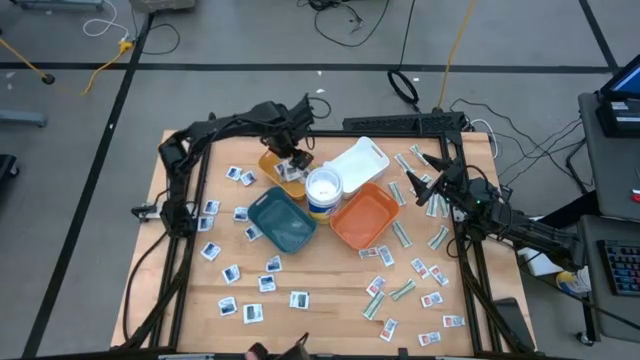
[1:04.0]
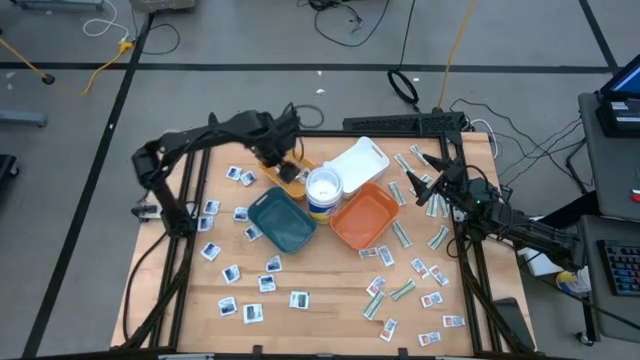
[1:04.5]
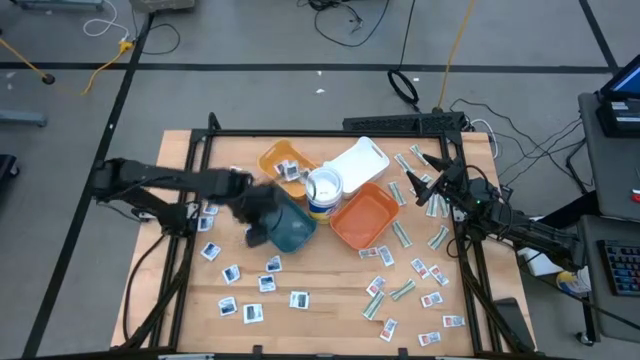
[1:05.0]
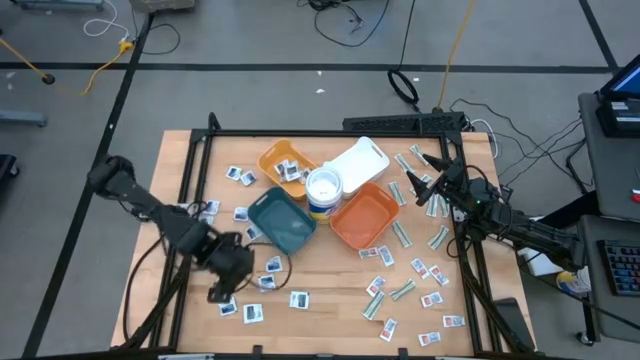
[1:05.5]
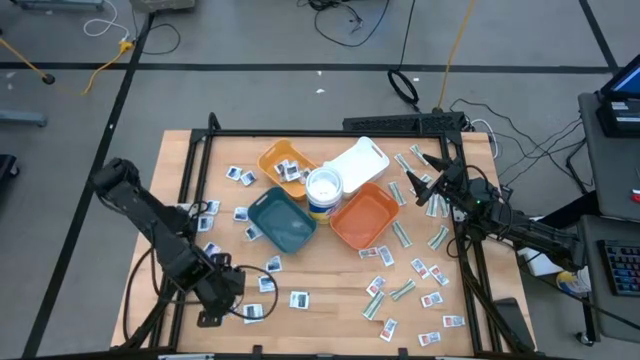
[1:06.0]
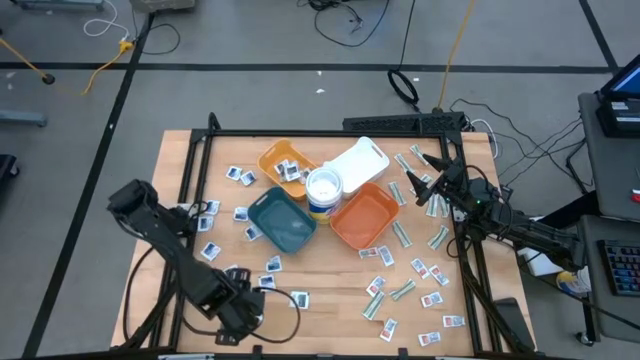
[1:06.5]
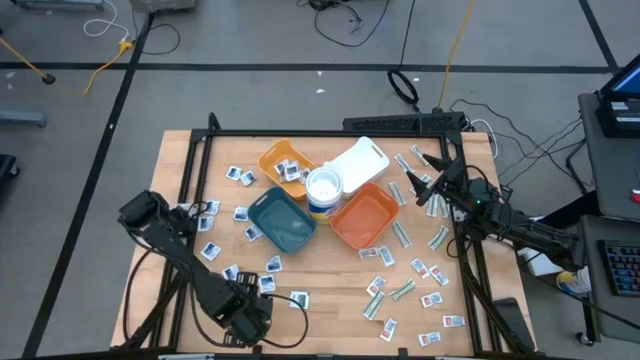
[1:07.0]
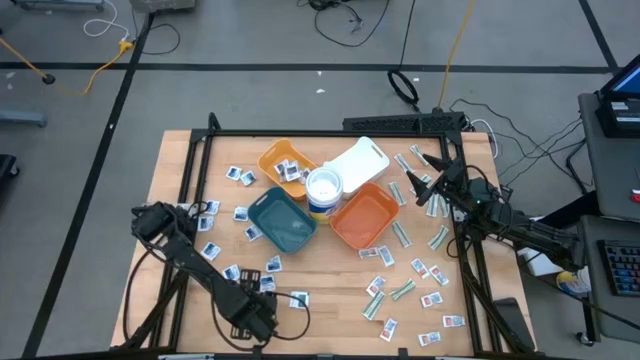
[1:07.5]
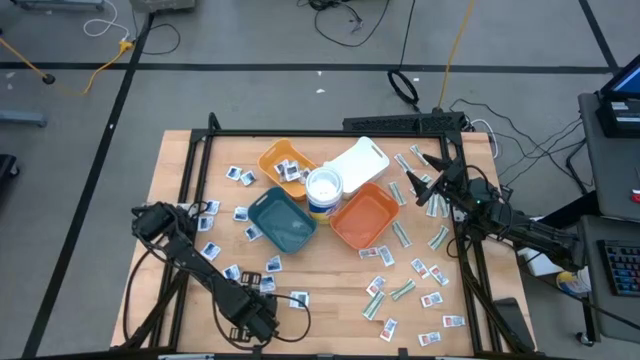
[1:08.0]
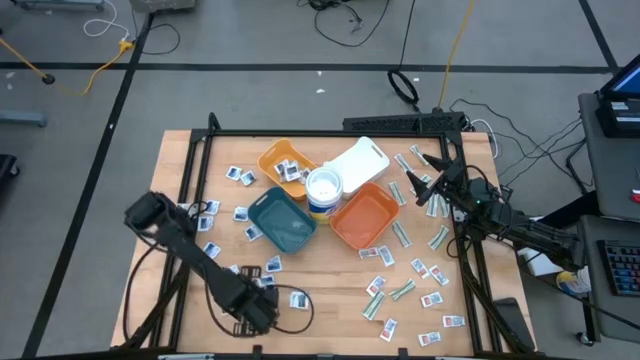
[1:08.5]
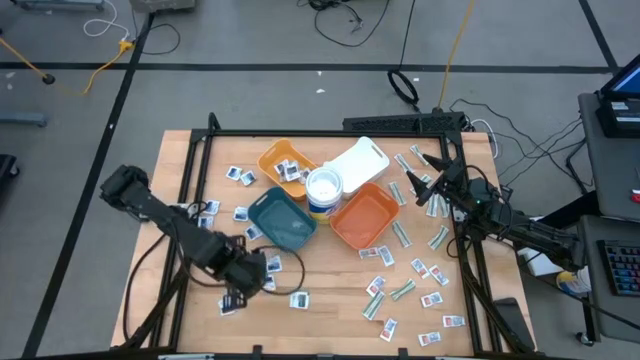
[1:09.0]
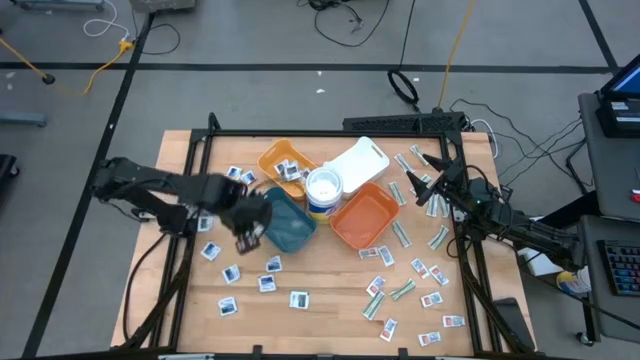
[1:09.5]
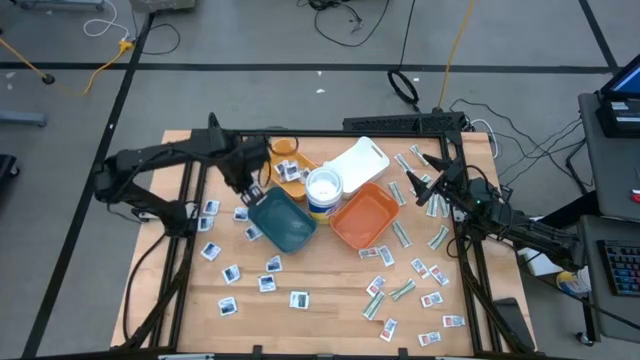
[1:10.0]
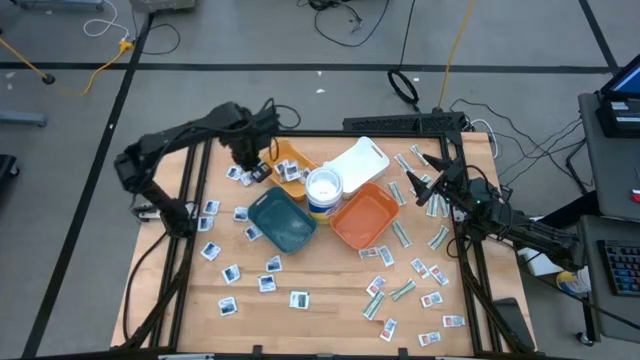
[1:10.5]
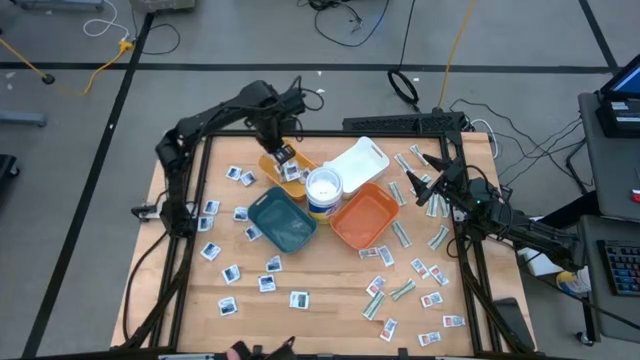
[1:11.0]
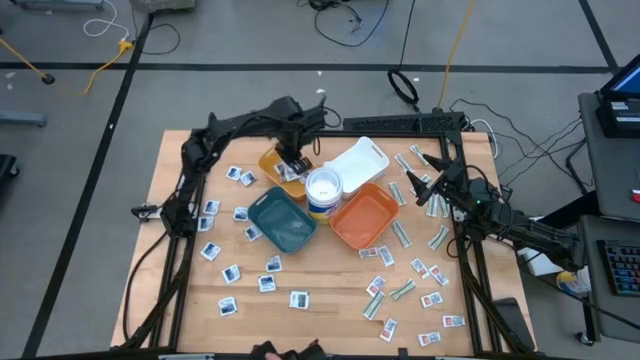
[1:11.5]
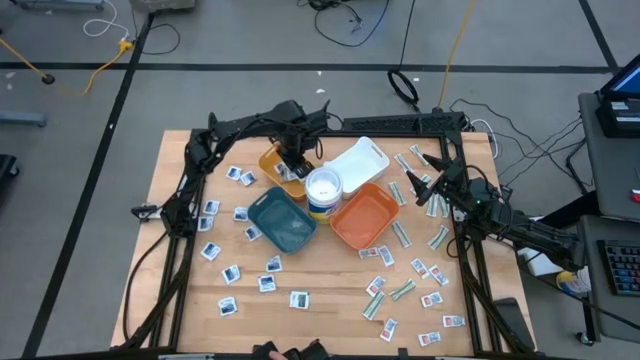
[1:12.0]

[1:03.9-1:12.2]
Task: Pick & Place First Aid Supplies
Put the black pad into the yellow bin

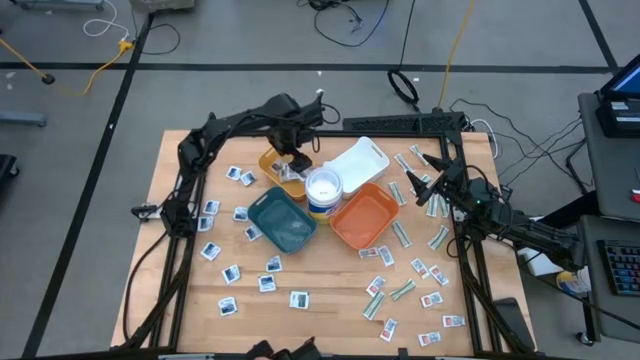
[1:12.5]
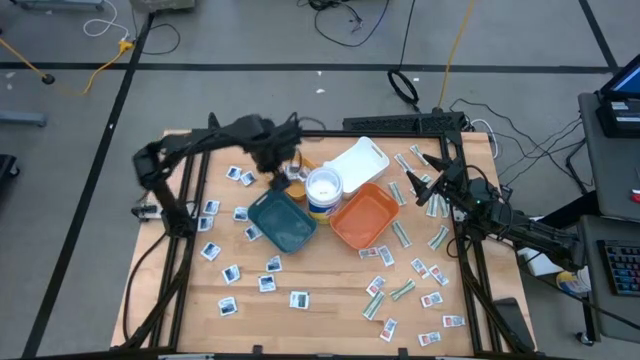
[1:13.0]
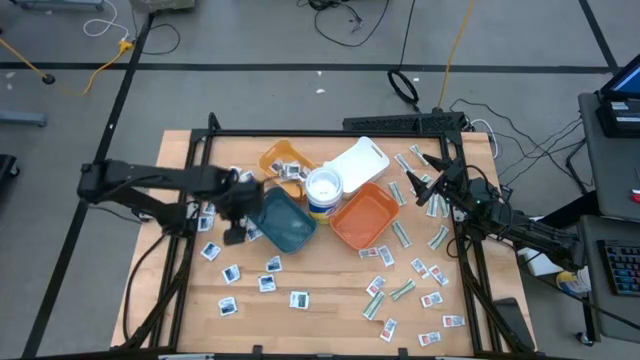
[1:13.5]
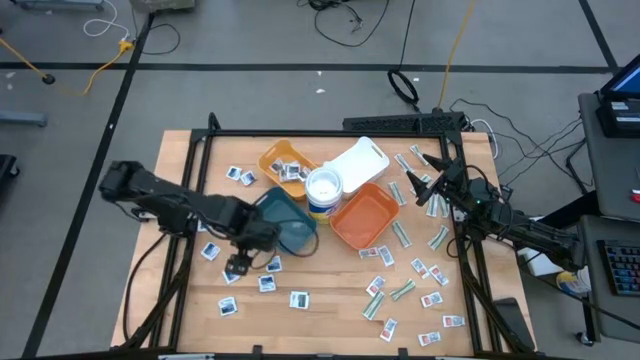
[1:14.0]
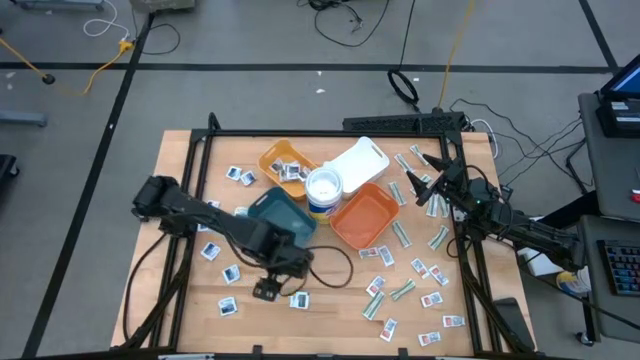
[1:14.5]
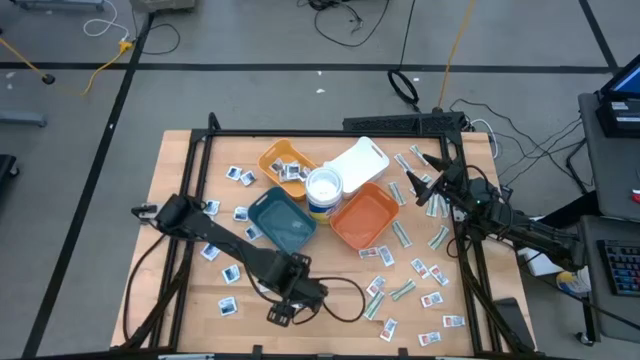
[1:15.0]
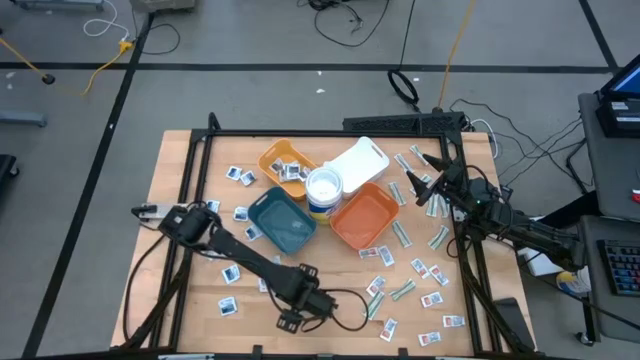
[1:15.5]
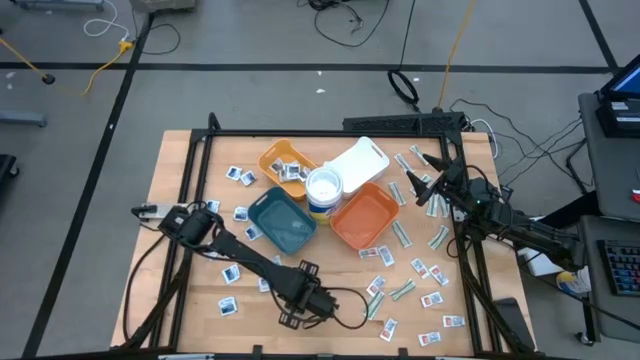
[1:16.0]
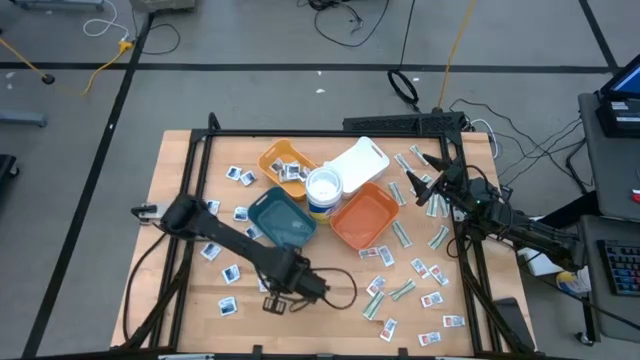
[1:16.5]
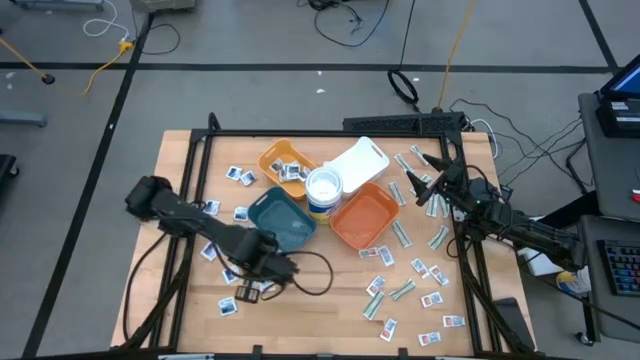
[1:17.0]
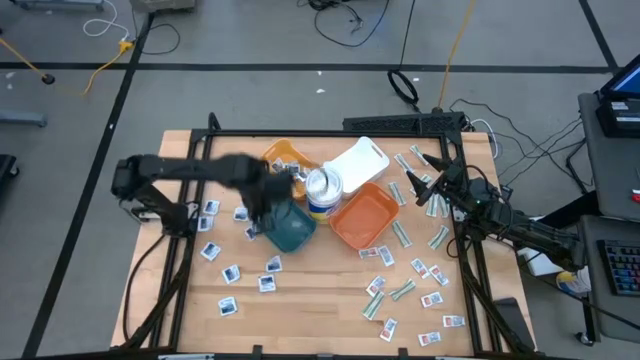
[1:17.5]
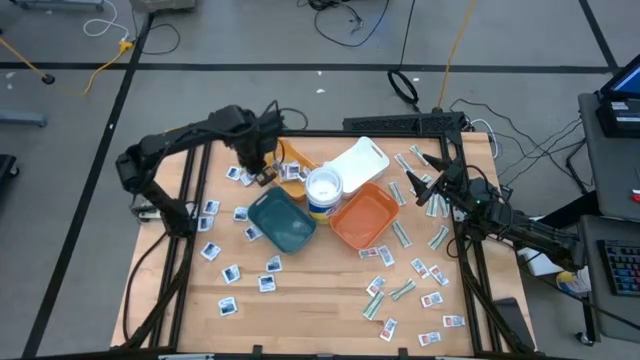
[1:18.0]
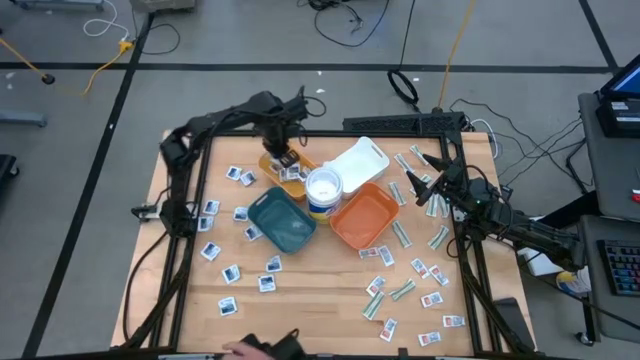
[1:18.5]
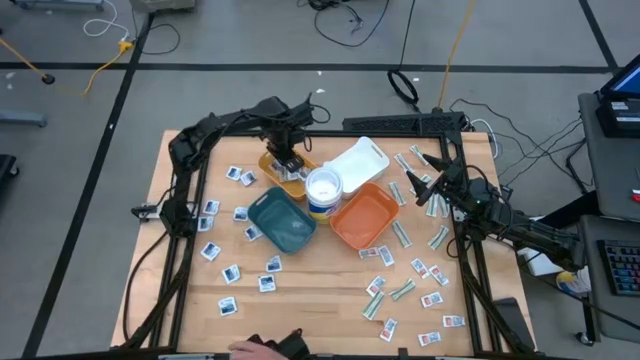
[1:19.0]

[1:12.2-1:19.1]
Put the black pad into the yellow bin

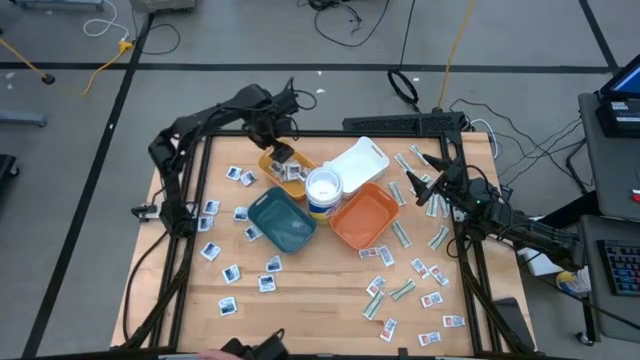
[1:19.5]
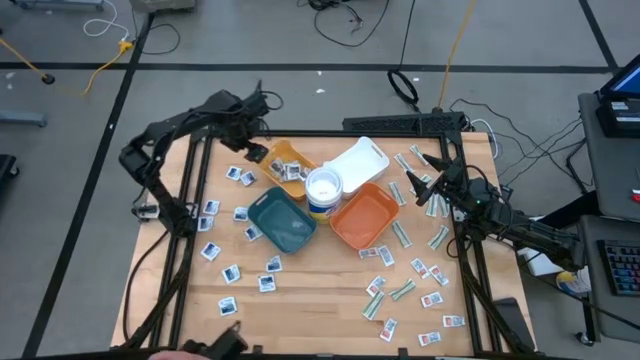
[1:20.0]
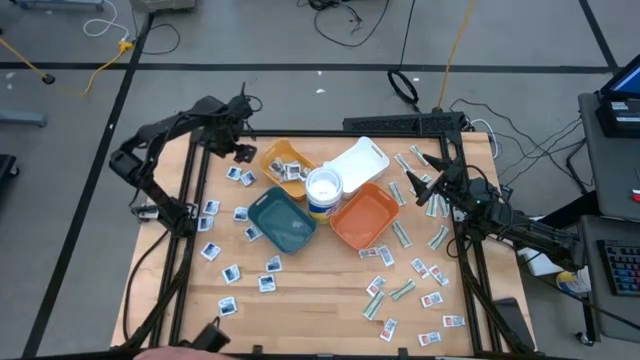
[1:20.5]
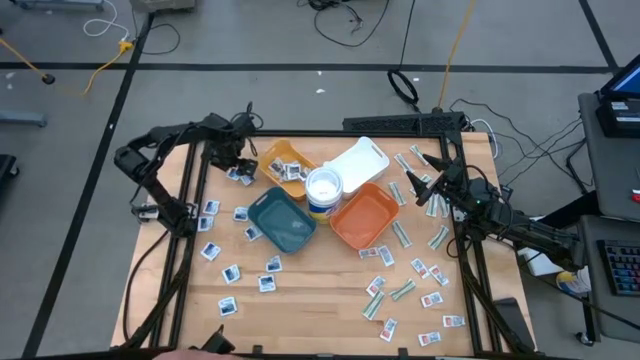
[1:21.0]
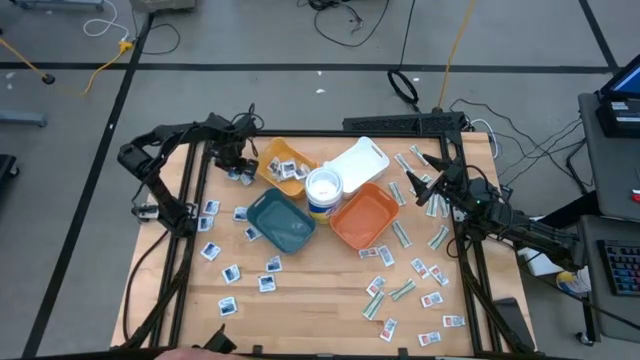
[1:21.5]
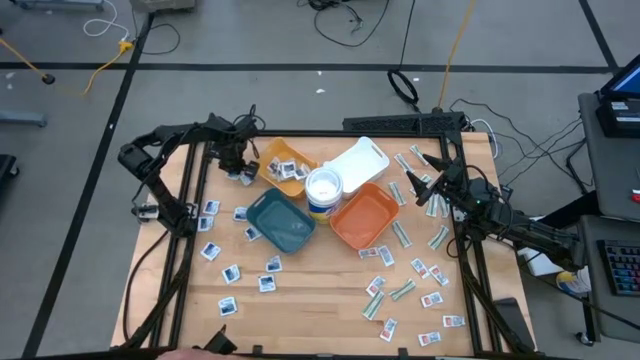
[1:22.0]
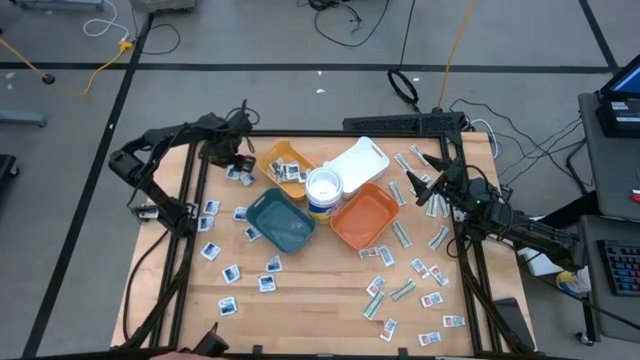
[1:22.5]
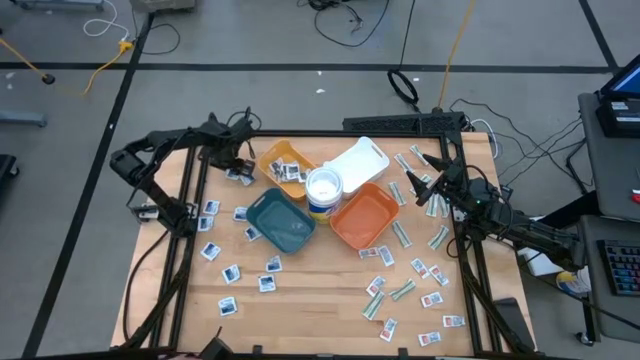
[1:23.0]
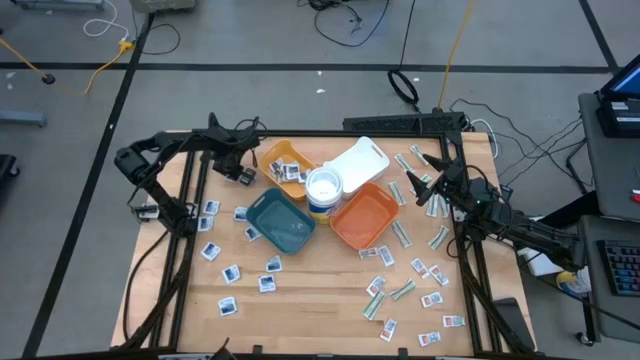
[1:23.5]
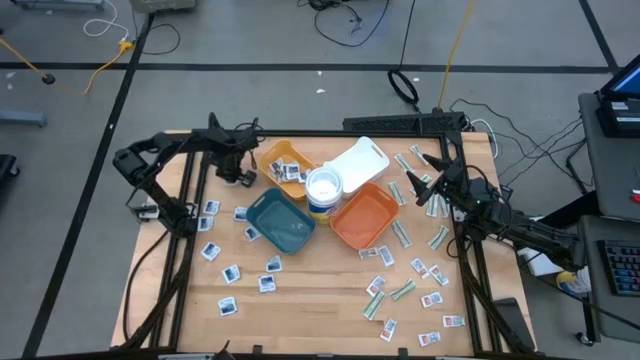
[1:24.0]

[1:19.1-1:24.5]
Put the blue pad into the blue bin

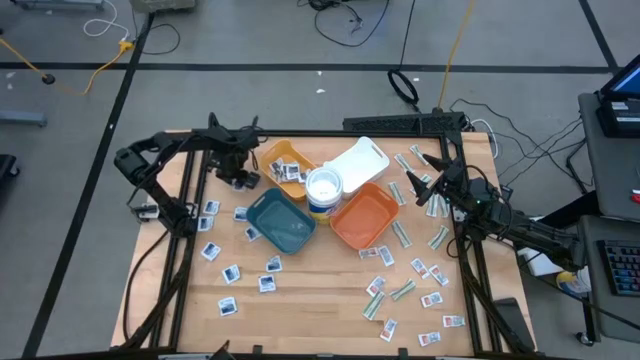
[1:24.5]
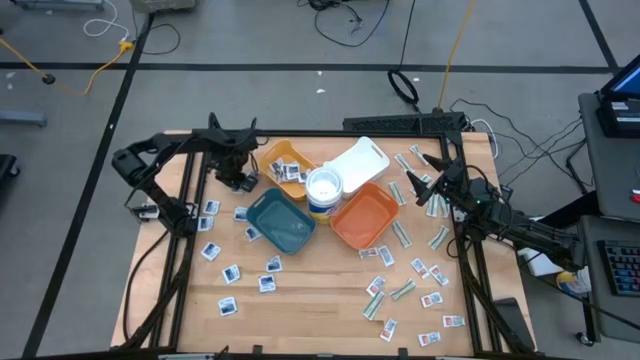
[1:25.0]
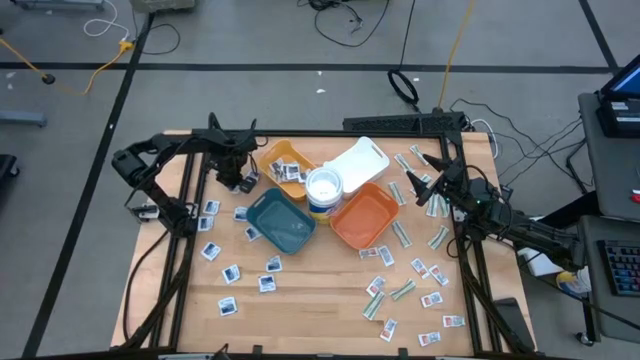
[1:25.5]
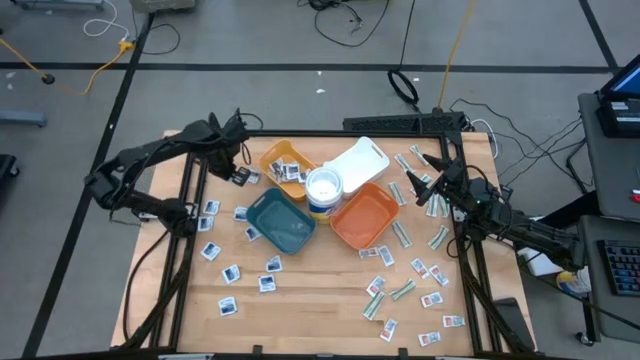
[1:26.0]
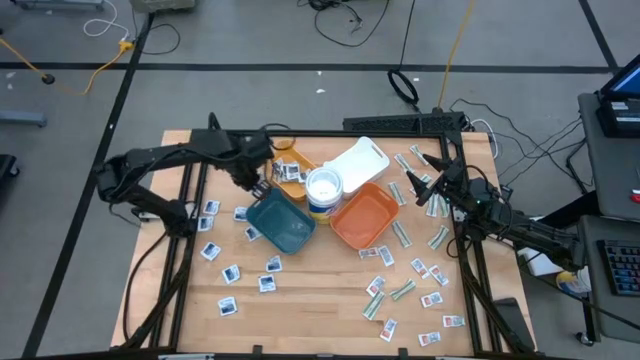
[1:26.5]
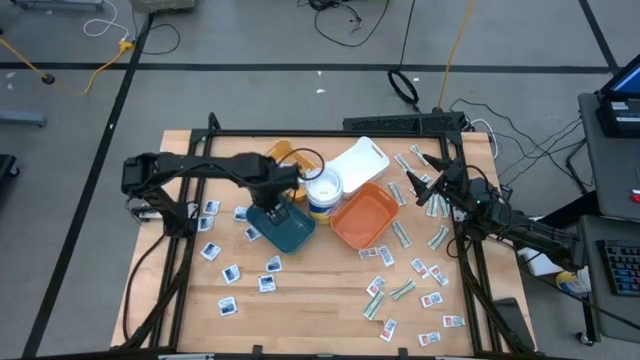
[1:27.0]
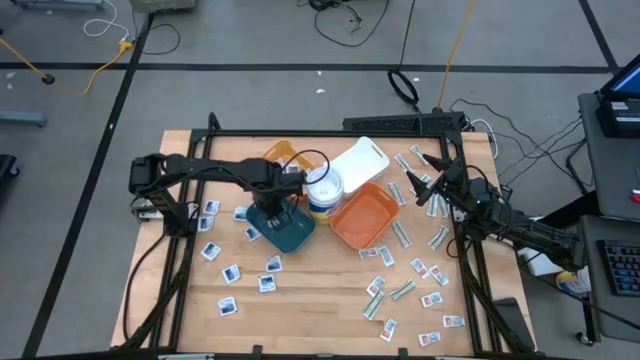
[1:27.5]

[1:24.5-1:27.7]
Put the blue pad into the blue bin
